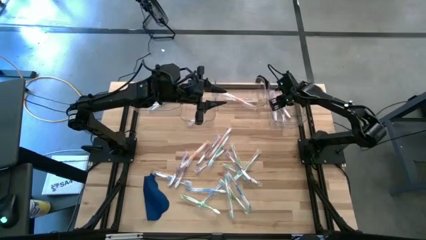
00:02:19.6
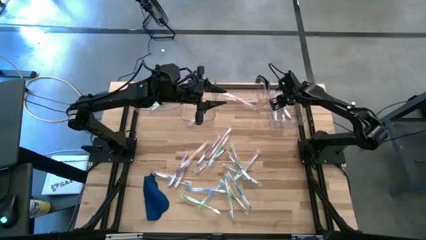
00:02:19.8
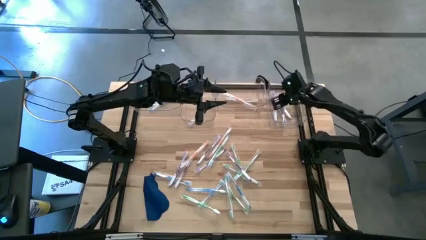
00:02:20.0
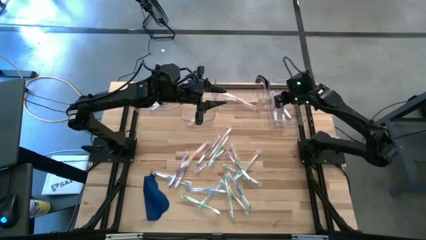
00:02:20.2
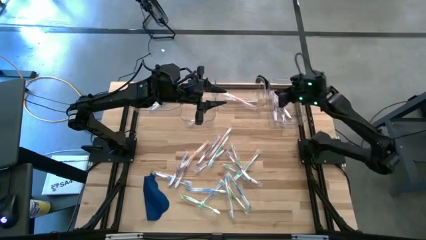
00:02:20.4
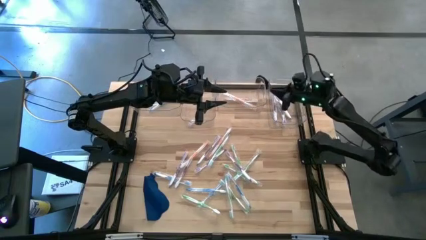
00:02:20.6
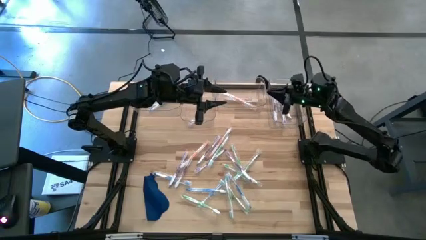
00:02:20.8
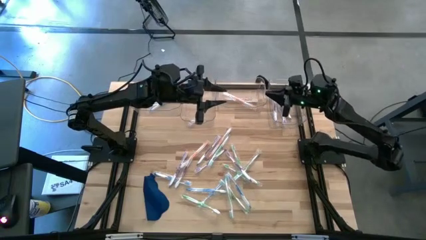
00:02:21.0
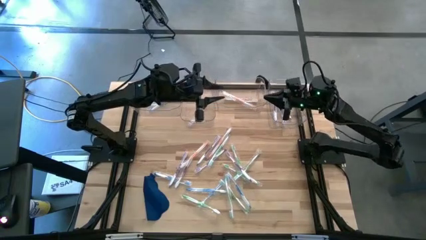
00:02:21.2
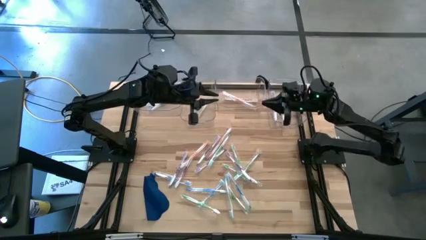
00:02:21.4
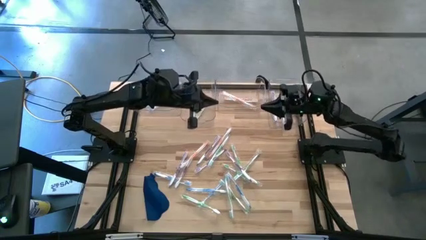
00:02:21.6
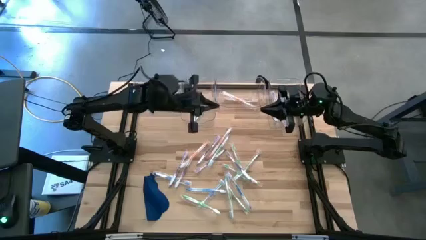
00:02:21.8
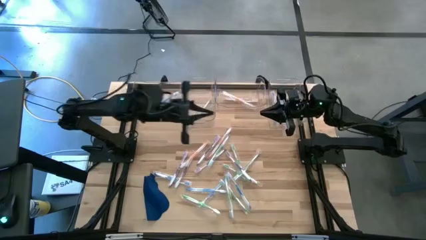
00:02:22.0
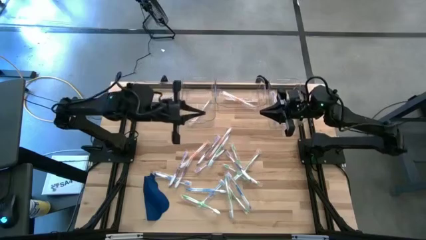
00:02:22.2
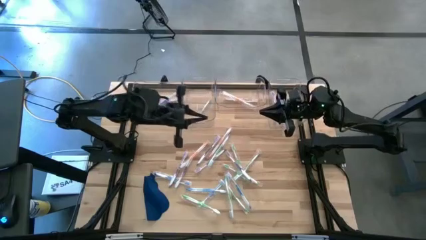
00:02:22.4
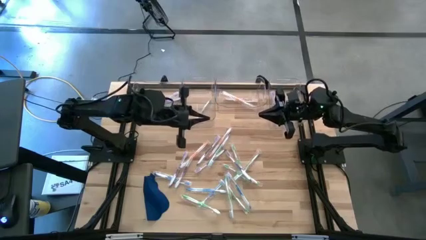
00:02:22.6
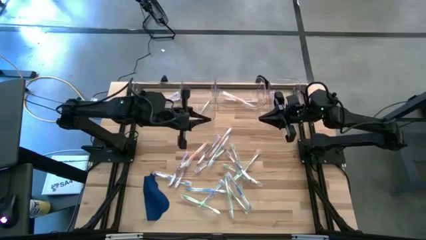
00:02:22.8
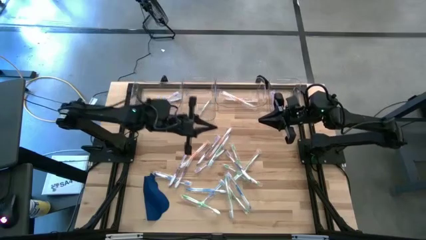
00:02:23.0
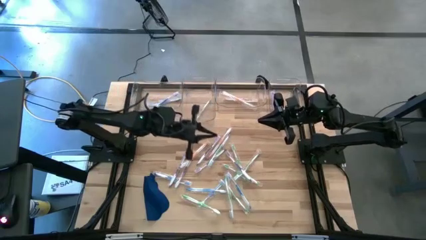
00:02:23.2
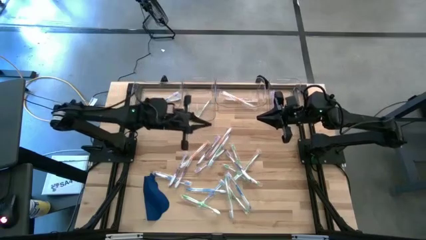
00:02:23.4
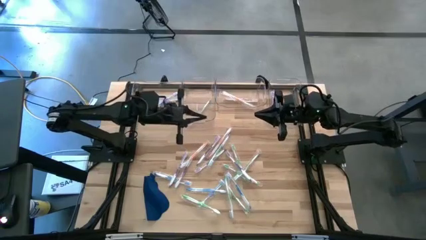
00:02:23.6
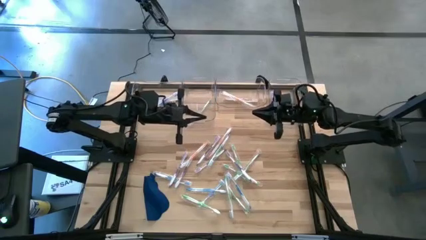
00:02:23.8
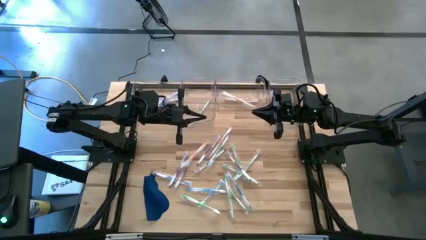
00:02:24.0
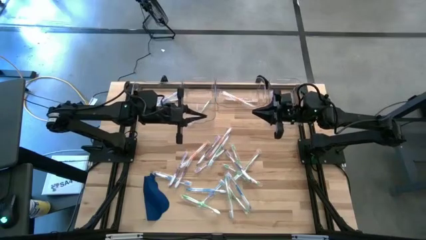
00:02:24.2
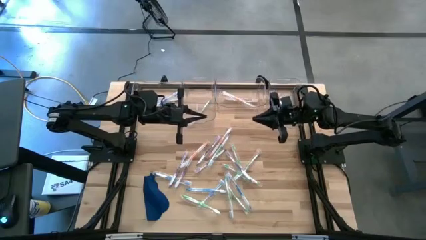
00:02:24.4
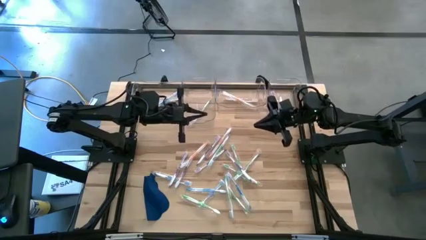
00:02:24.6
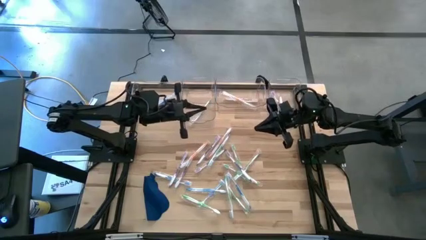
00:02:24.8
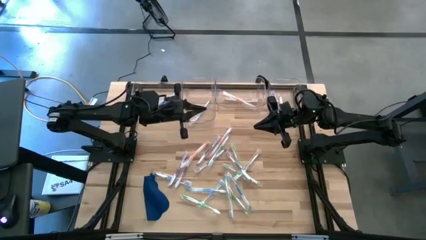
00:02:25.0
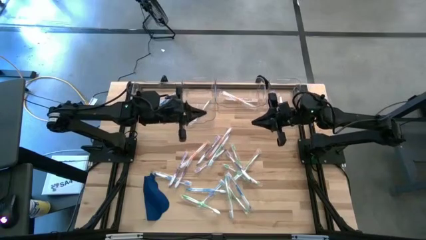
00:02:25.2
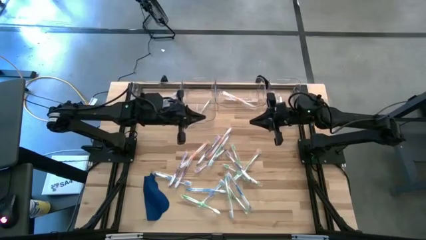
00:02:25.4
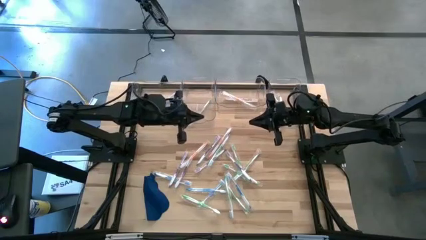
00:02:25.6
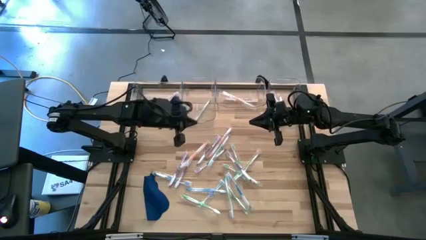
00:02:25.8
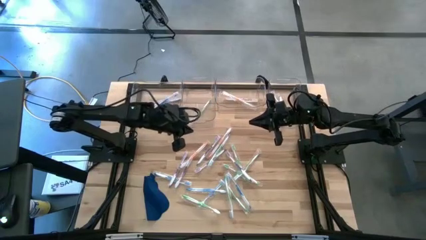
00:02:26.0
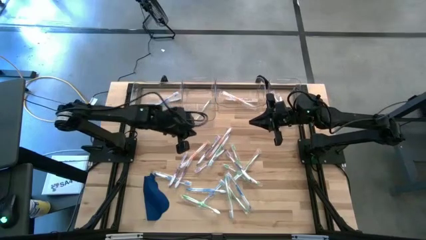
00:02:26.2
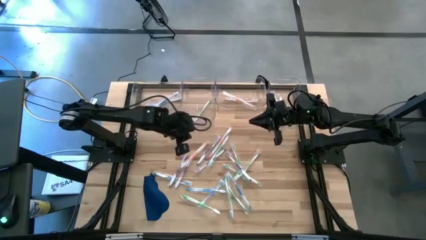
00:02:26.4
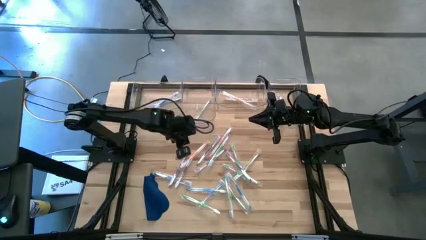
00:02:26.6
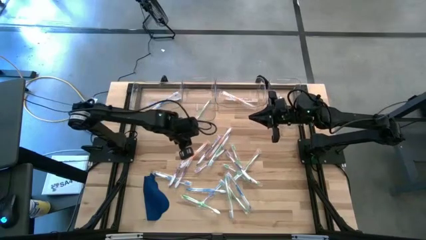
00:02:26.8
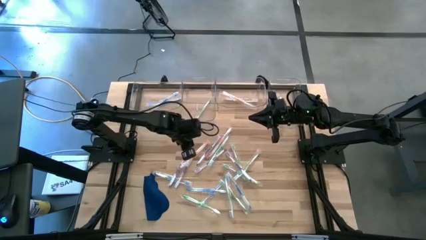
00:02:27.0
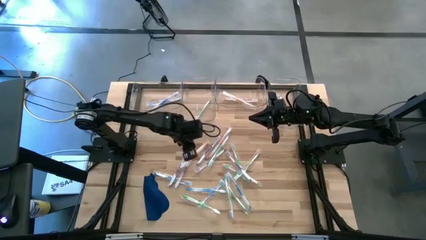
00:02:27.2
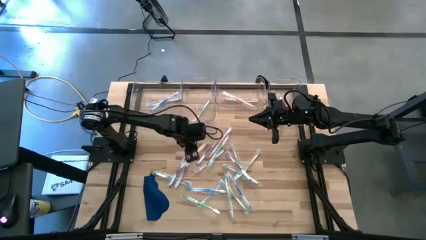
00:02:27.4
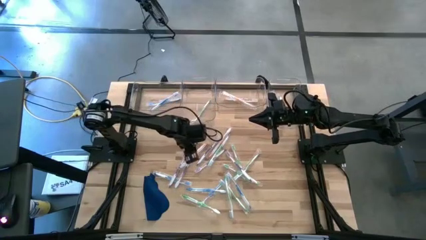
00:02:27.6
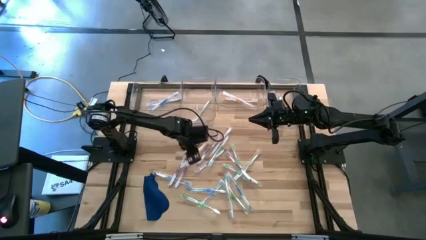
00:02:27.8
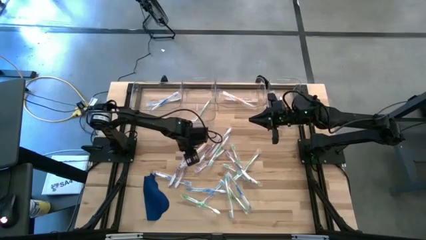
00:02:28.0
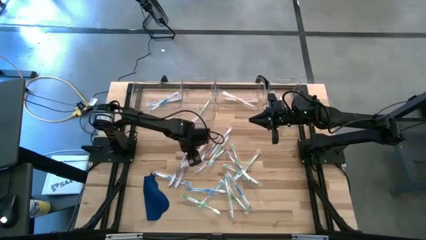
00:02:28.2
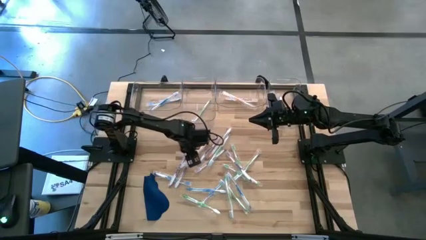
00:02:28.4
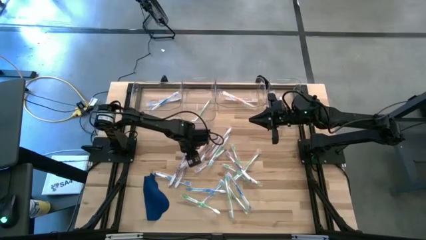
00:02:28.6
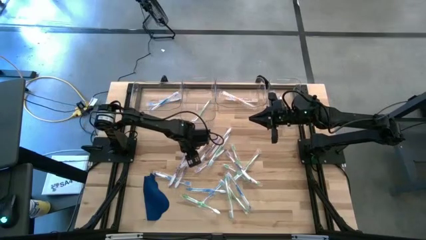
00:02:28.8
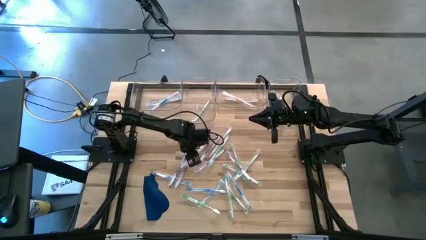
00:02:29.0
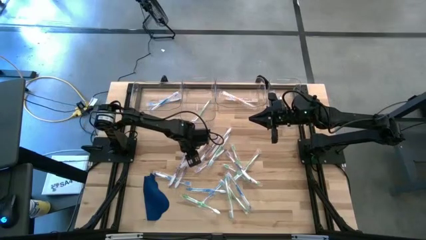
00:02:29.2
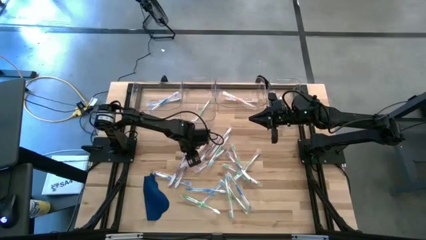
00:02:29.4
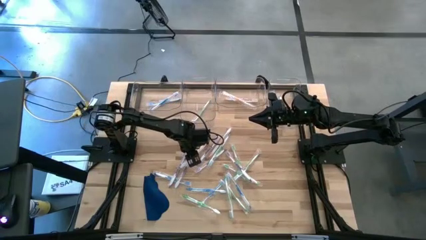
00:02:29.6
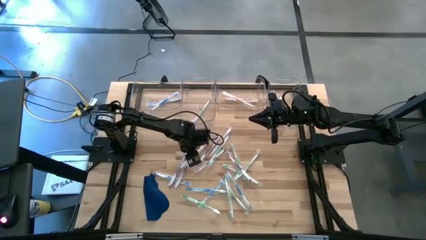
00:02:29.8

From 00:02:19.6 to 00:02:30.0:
Task: Pick & Place Toothbrushes
Put the orange toothbrush into the middle right transparent bin

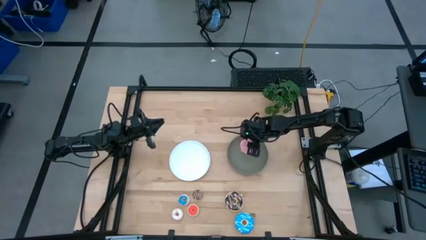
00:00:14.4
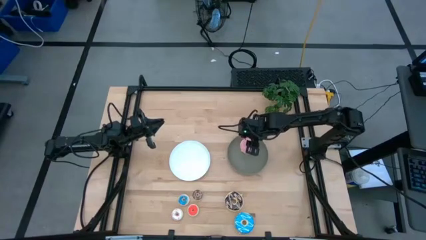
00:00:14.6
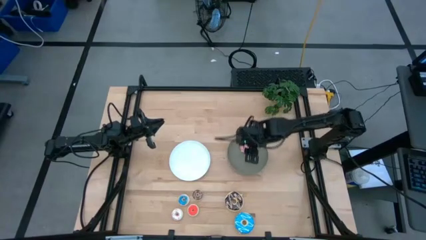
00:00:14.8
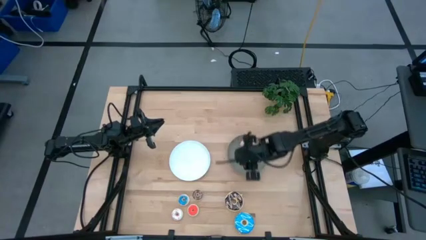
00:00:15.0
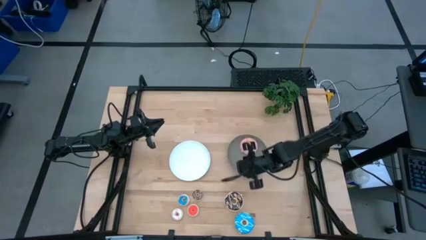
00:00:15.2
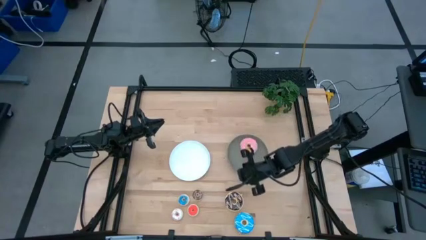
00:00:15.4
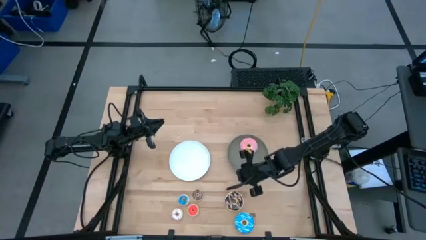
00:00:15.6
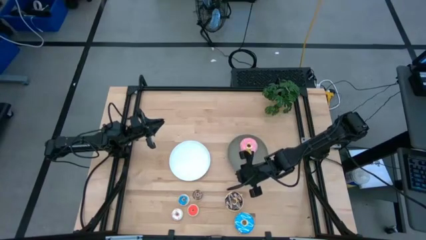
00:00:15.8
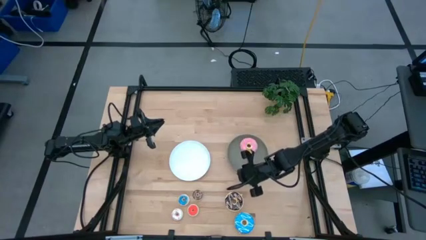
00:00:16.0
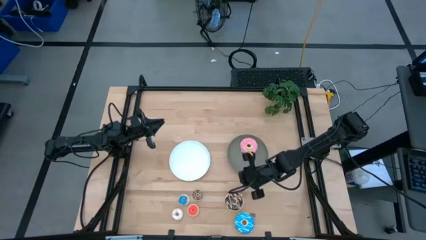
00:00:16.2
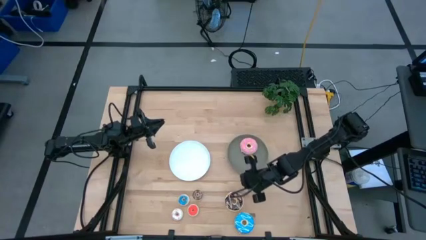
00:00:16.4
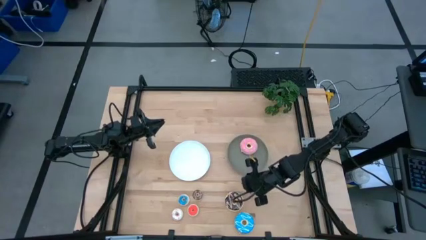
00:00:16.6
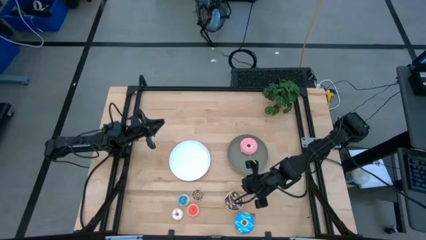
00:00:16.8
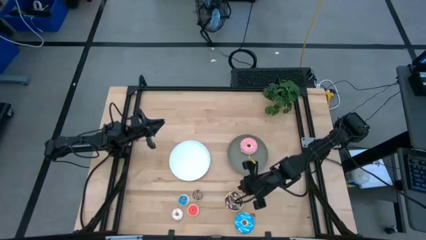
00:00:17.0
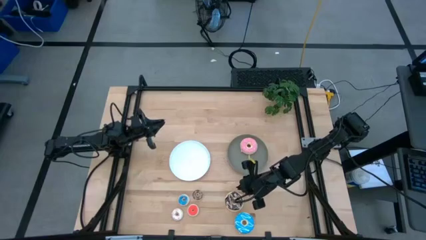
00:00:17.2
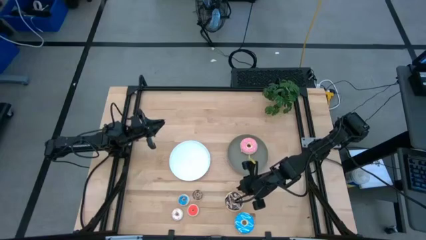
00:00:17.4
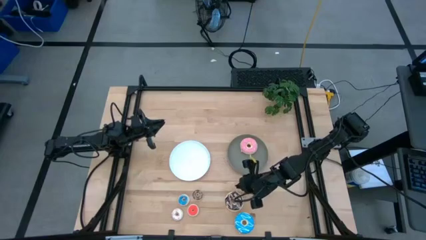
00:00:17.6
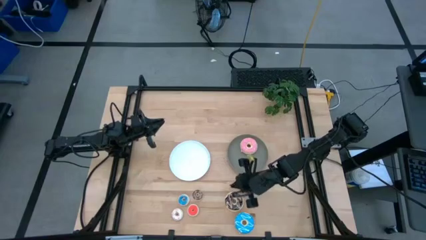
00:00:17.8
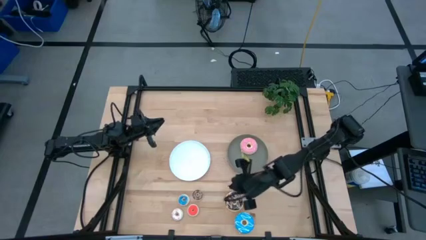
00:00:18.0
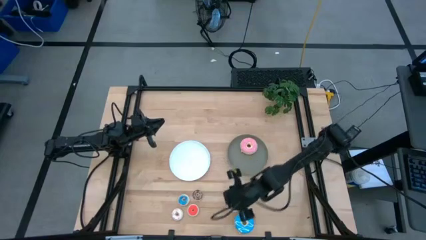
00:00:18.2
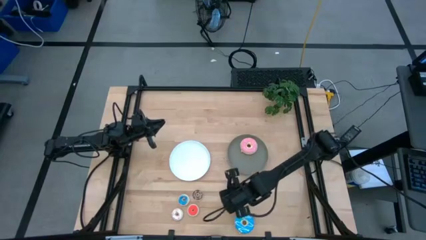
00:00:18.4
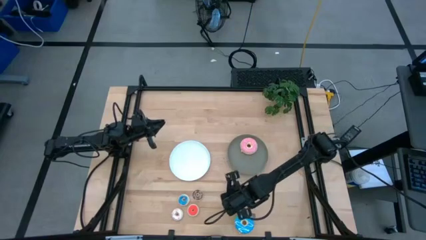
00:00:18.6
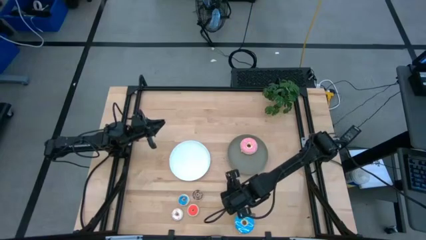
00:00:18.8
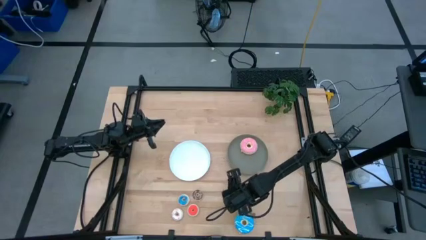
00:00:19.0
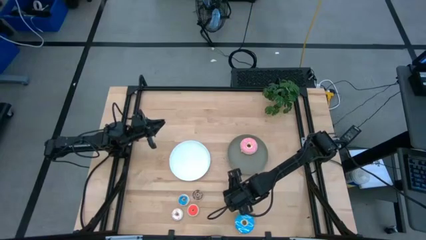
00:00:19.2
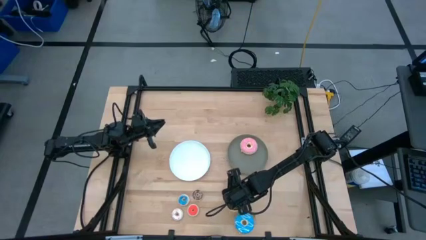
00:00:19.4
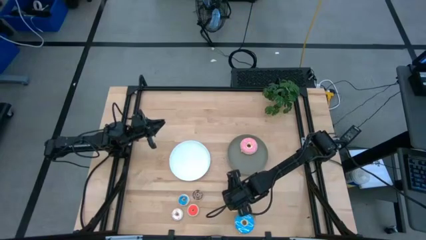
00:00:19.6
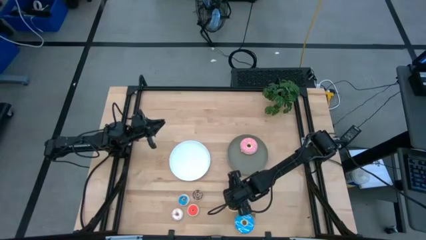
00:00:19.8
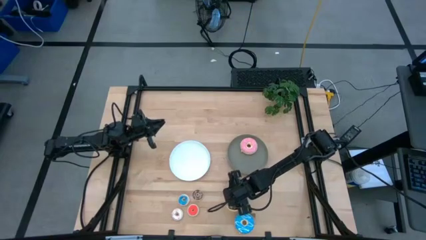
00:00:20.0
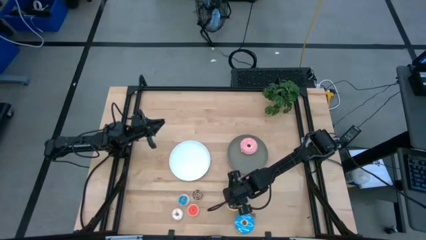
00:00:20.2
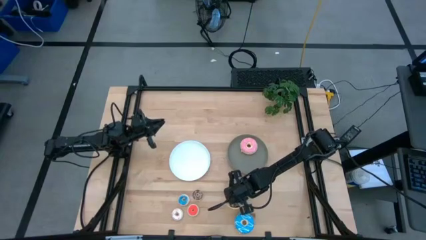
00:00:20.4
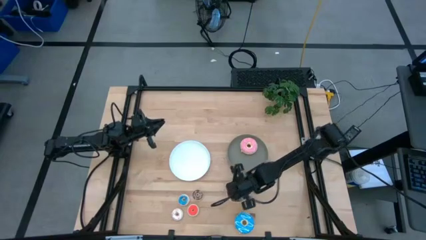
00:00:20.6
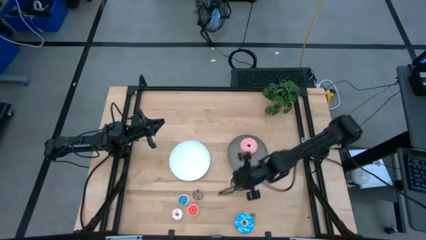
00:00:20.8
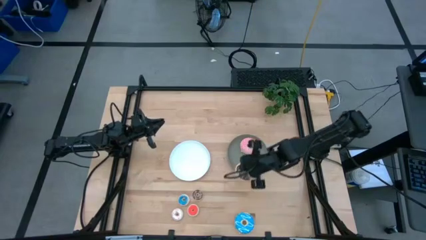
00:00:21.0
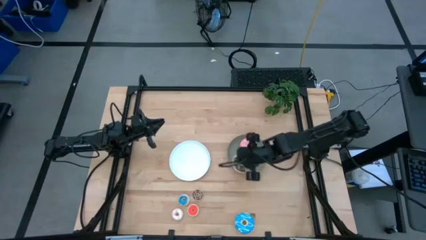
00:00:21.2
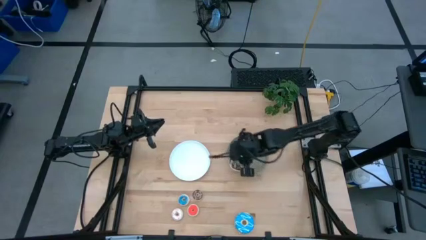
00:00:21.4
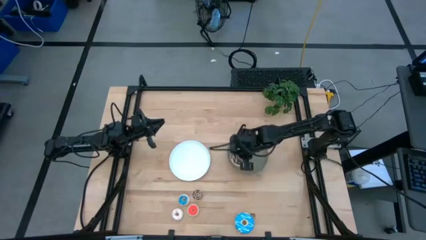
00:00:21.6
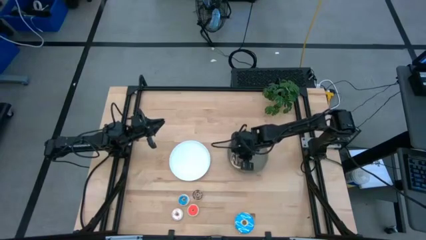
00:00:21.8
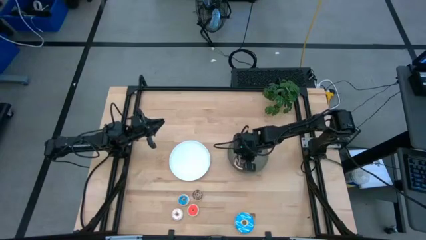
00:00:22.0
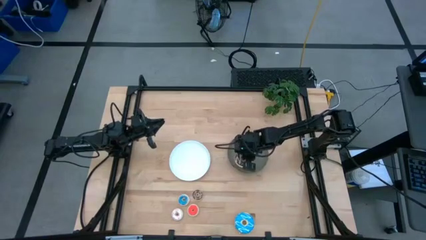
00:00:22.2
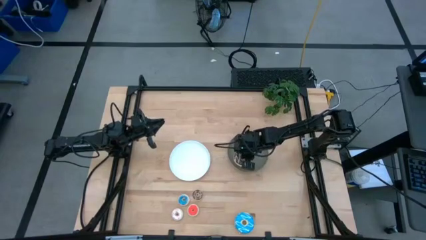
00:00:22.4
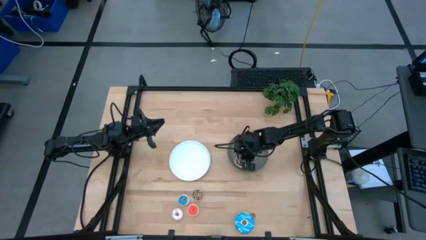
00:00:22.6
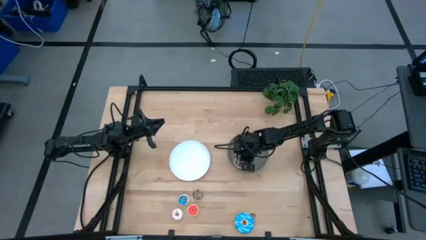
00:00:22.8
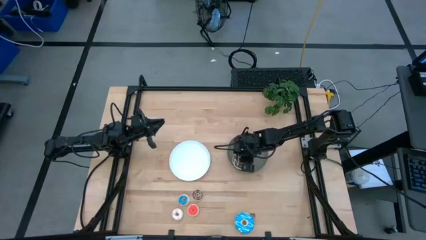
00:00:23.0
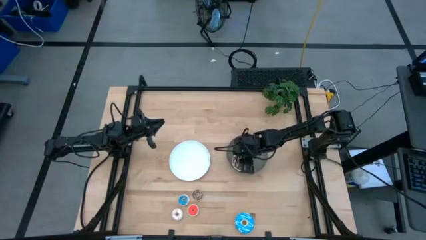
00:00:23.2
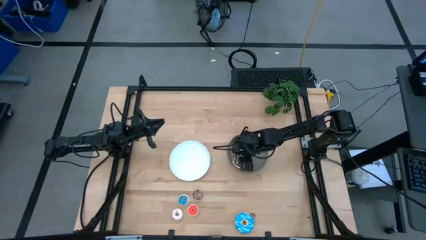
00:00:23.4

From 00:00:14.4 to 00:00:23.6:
Task: Pick & Place donuts
Put the large black donut on the gray plate
